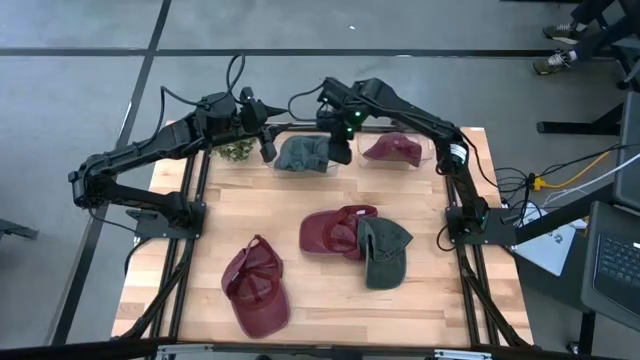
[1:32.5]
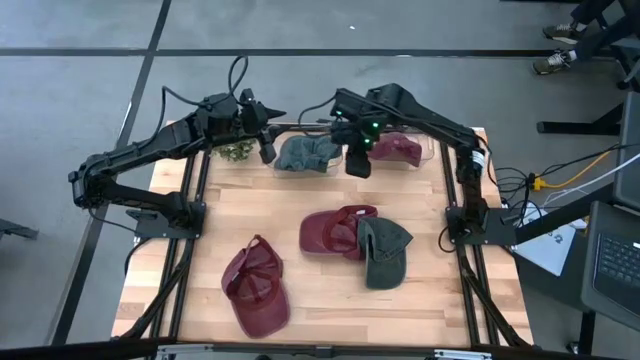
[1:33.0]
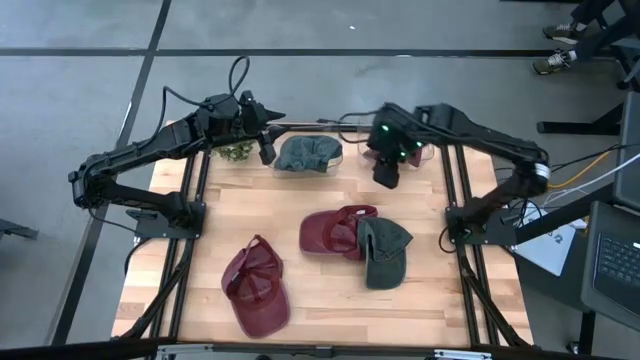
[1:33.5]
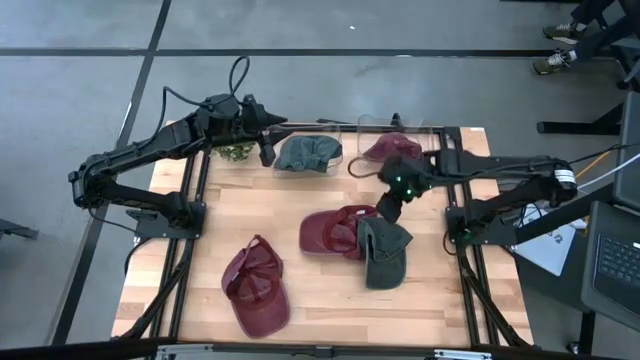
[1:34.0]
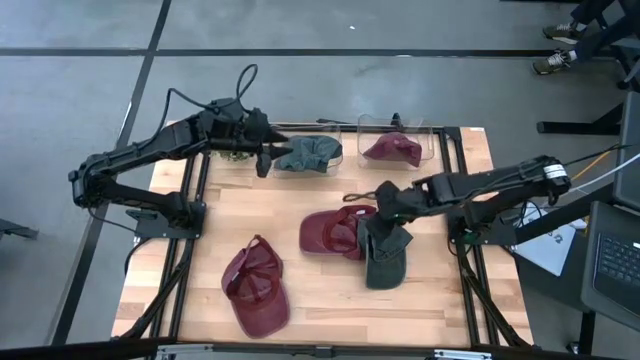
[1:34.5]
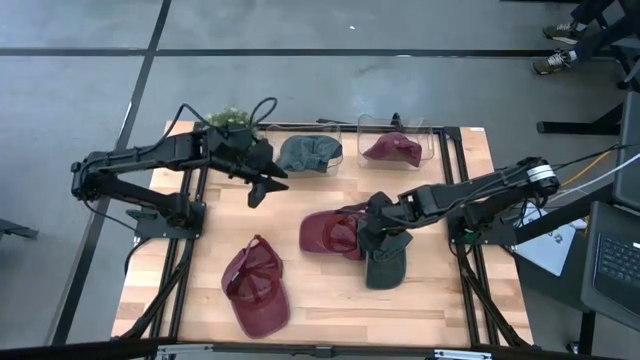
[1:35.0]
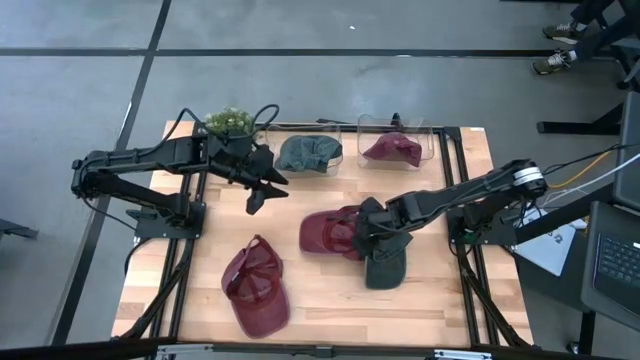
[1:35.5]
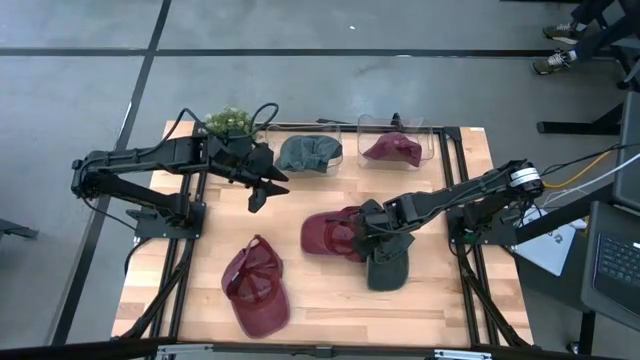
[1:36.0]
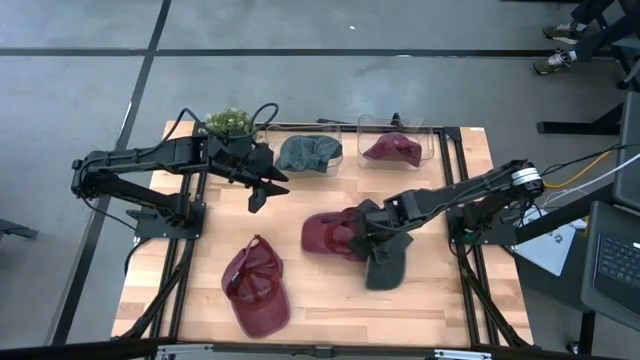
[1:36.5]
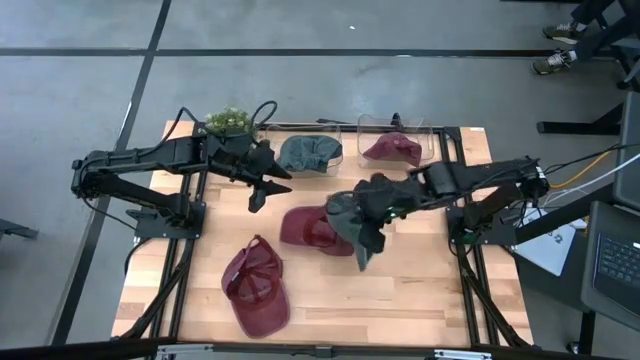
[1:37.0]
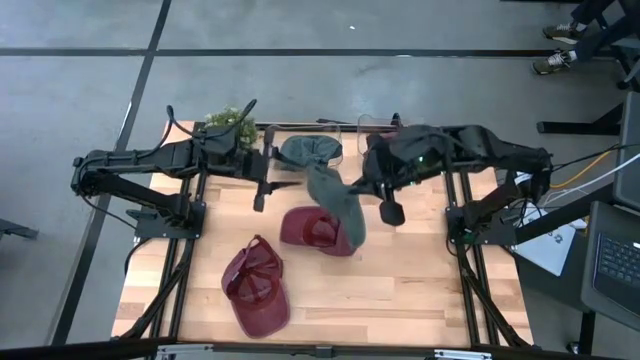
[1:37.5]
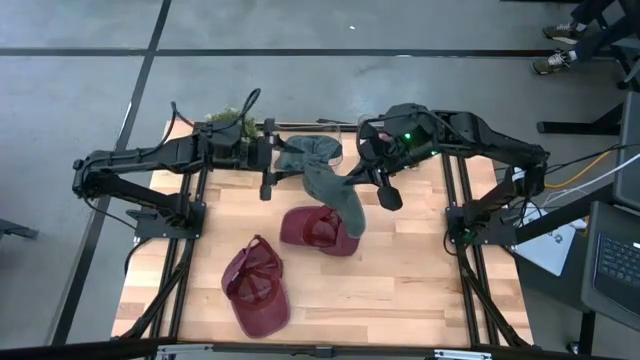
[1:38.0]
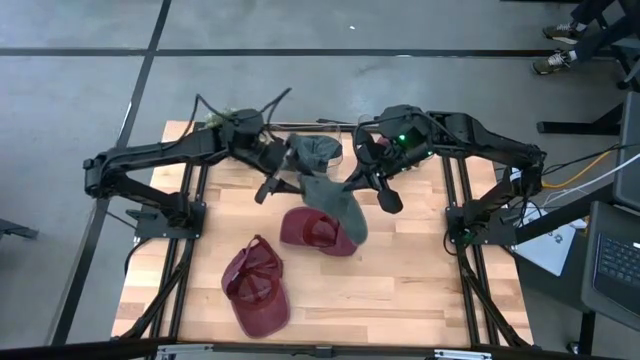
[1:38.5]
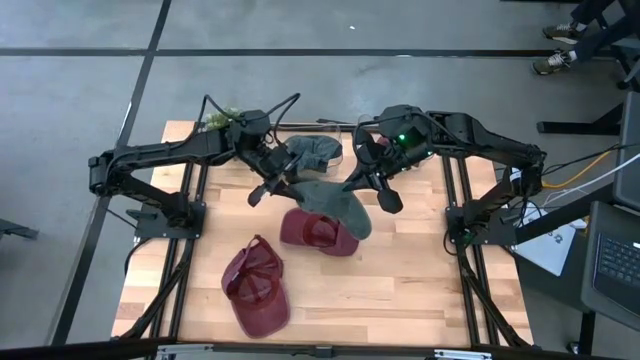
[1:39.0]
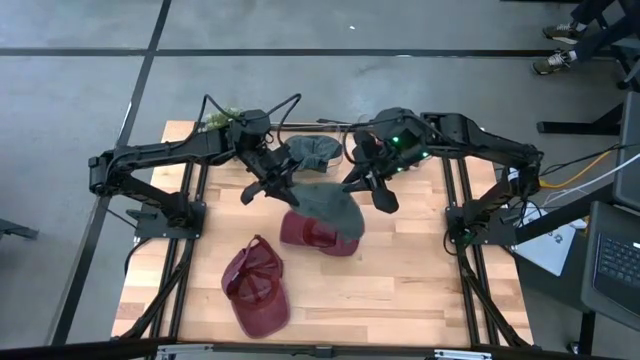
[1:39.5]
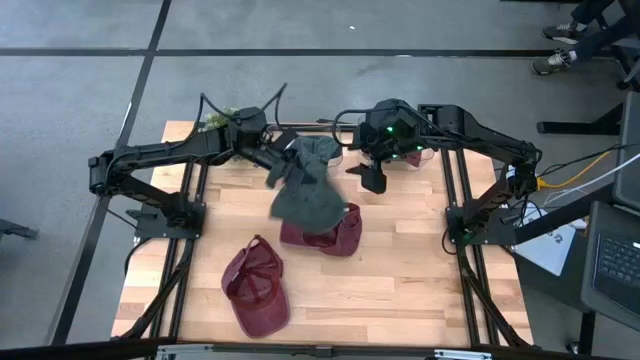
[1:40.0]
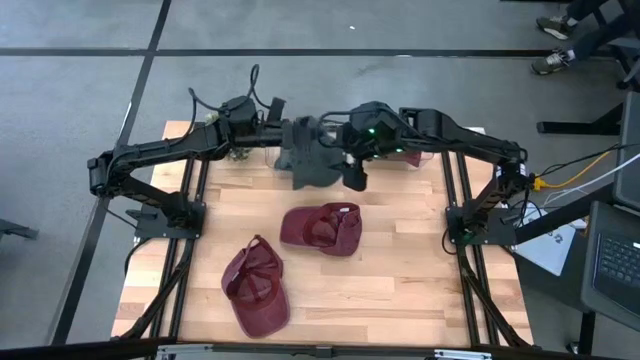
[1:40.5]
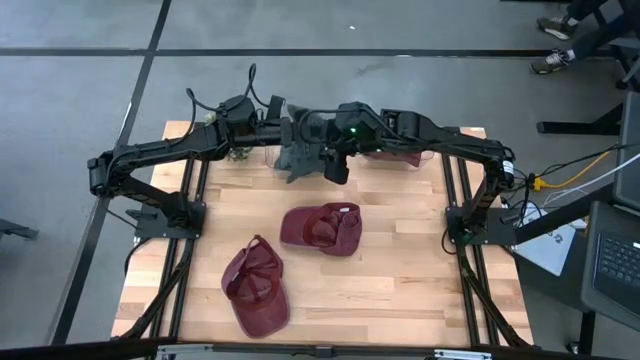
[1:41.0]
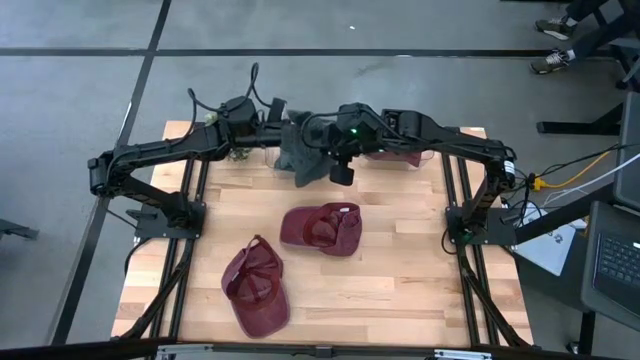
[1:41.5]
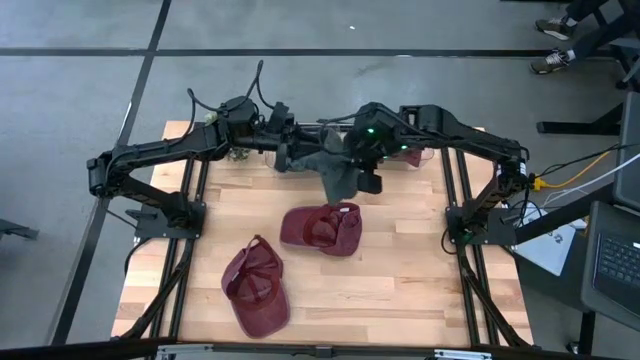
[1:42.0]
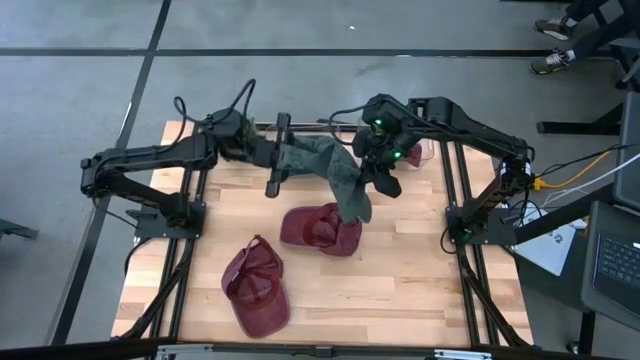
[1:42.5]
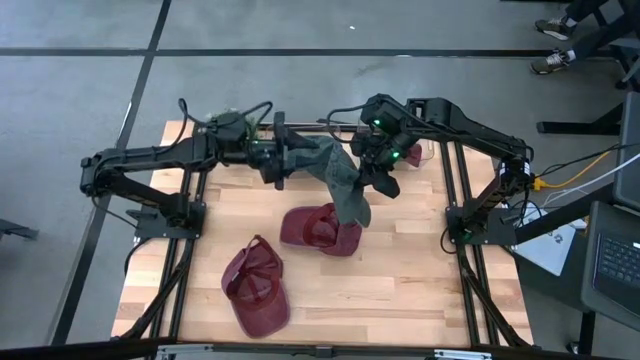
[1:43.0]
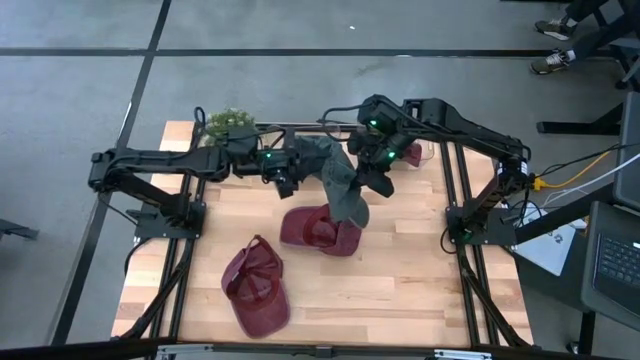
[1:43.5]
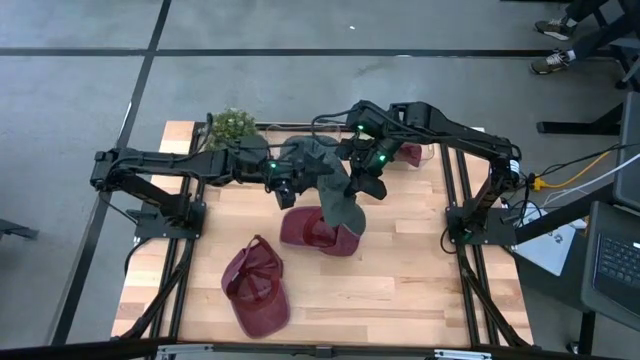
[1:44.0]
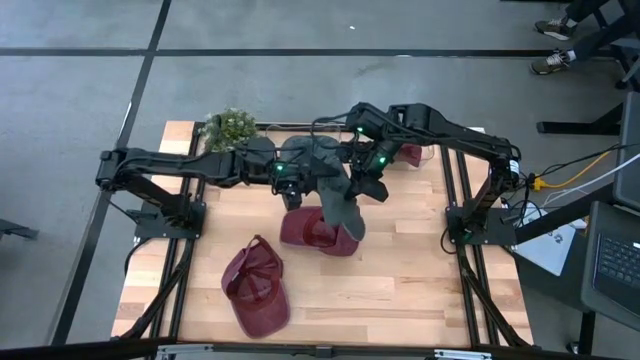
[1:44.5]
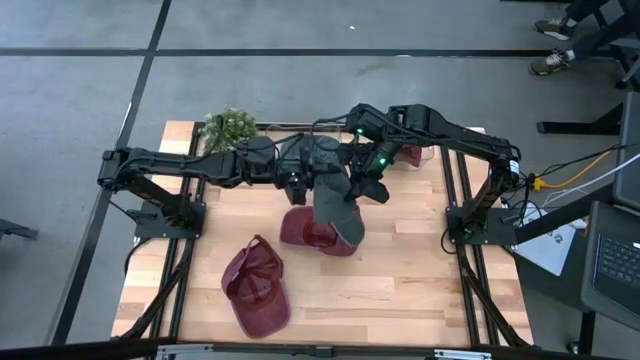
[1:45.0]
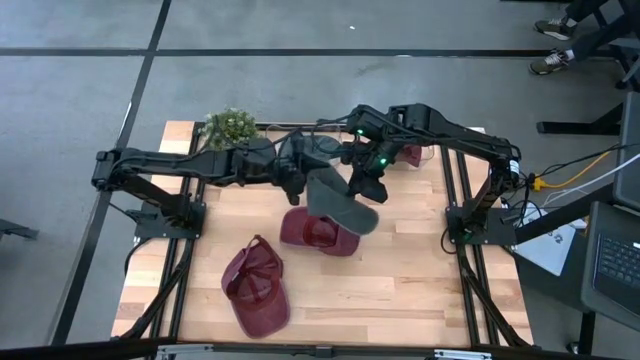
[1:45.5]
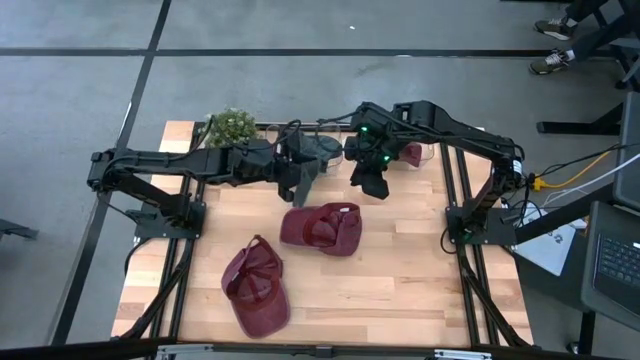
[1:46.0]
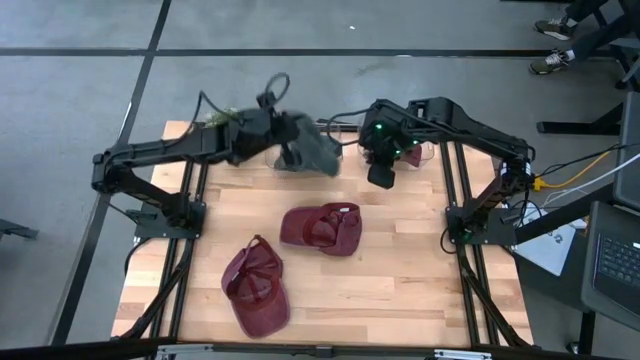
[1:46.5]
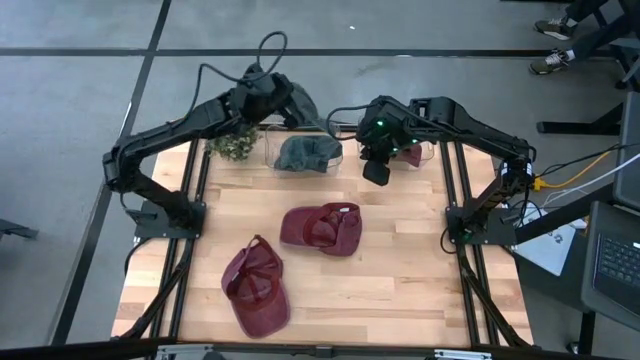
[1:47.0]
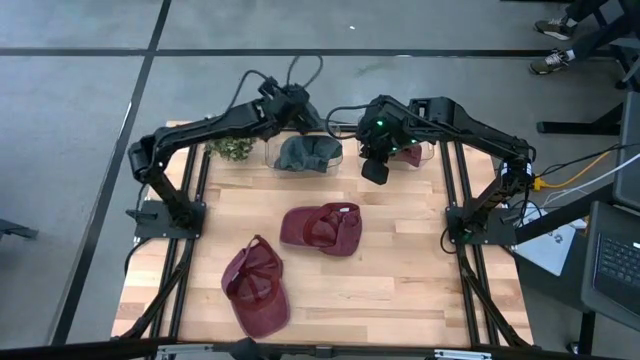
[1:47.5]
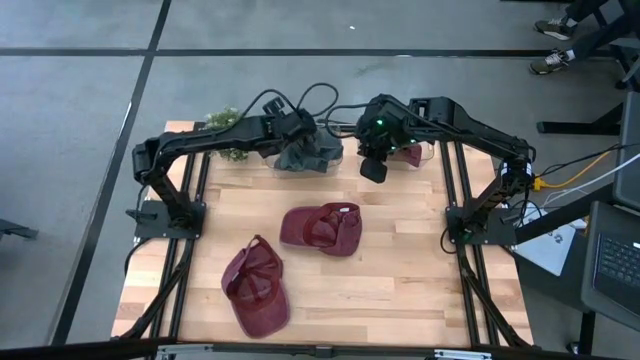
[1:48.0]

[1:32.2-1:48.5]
Task: Pick & Place hat
Put the gray cap on the gray cap in the left transparent bin

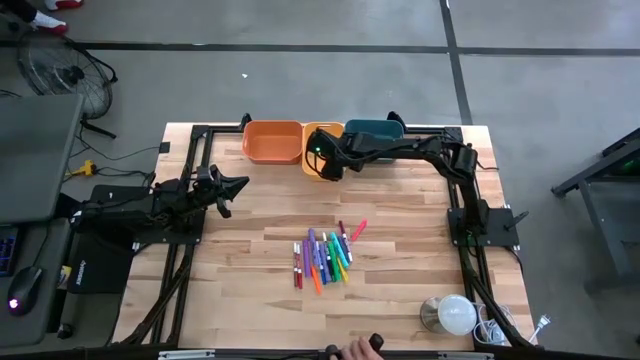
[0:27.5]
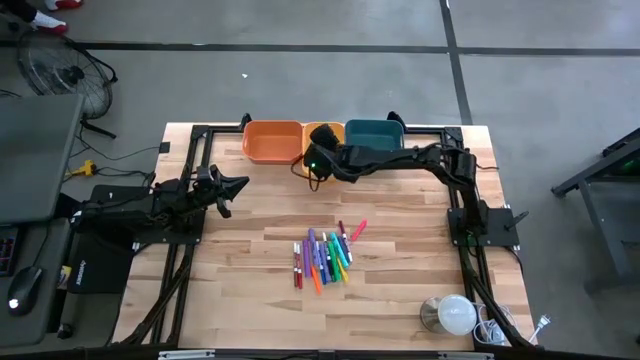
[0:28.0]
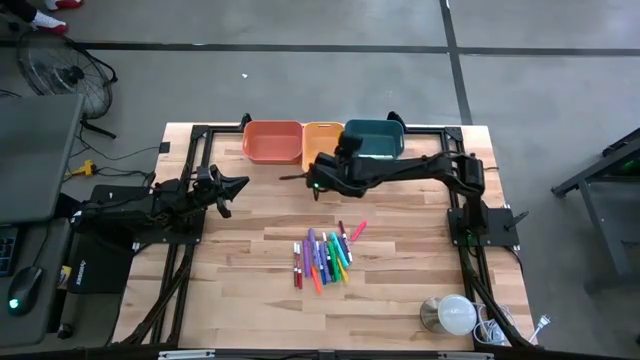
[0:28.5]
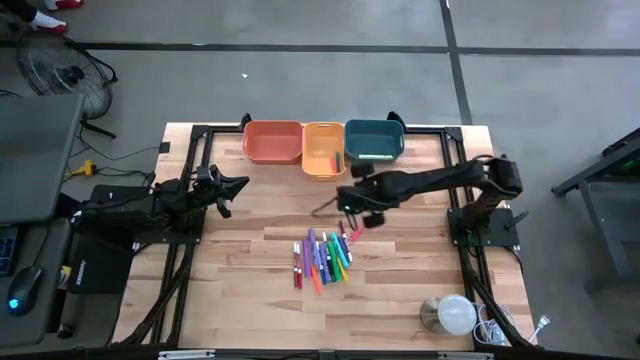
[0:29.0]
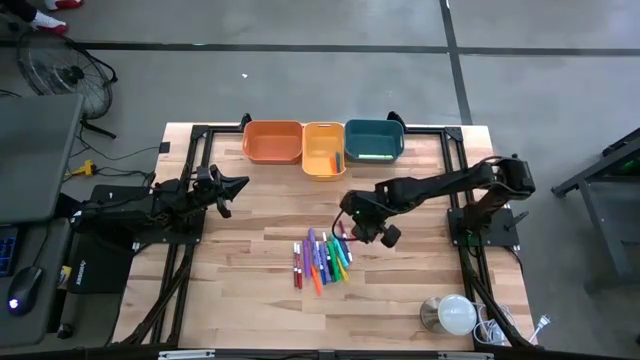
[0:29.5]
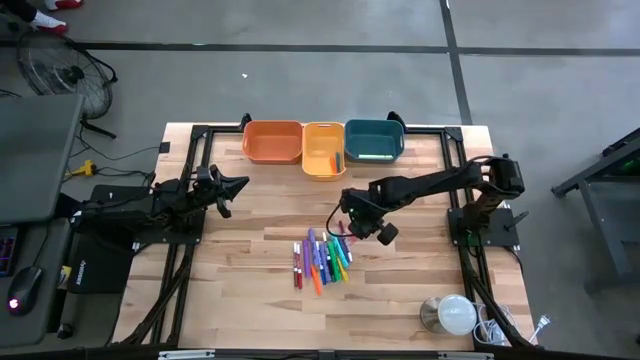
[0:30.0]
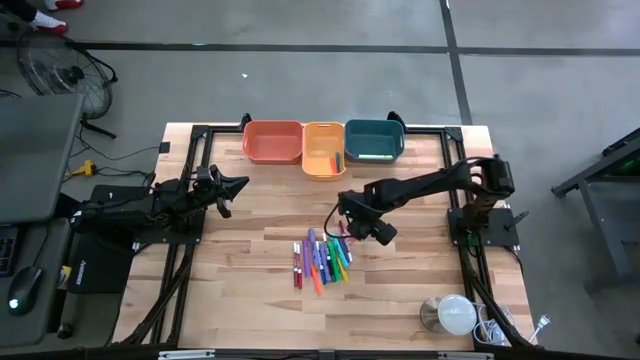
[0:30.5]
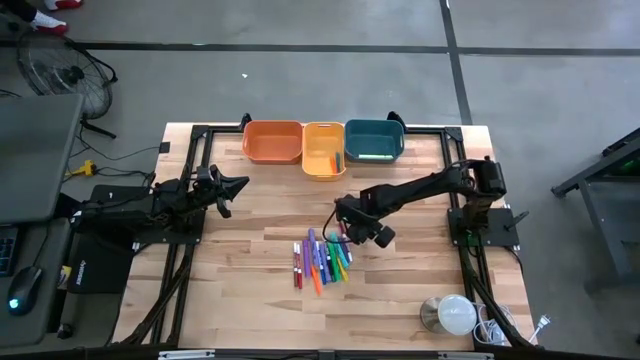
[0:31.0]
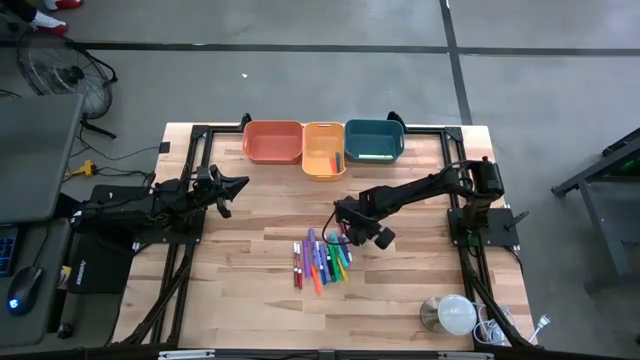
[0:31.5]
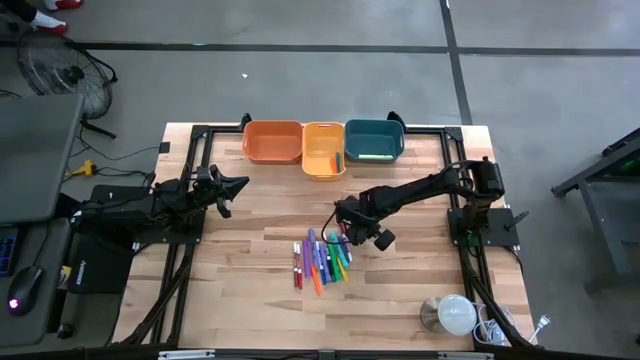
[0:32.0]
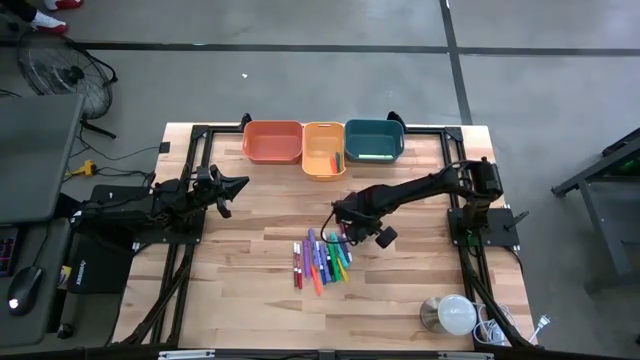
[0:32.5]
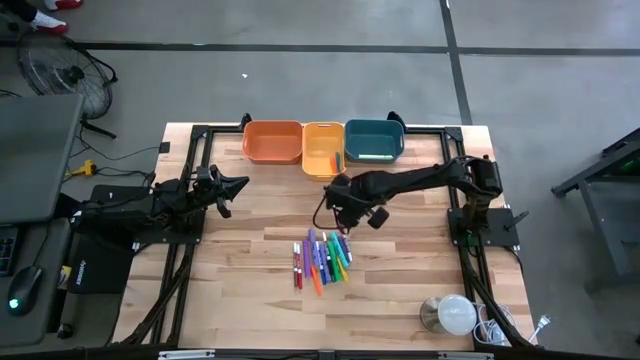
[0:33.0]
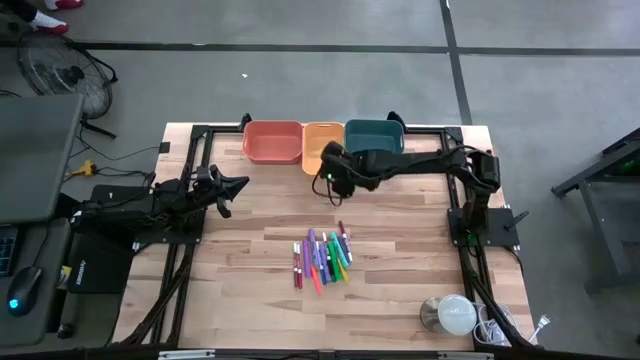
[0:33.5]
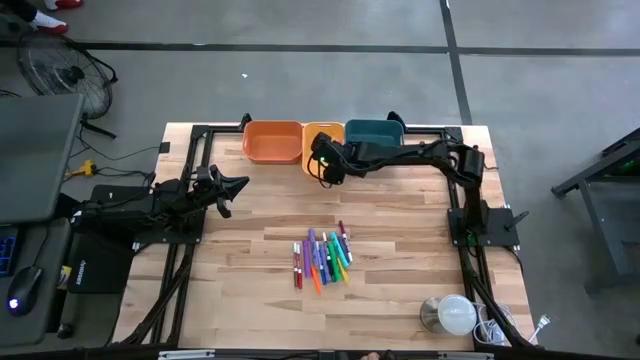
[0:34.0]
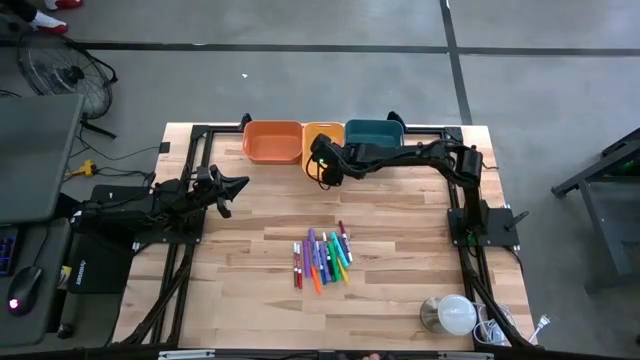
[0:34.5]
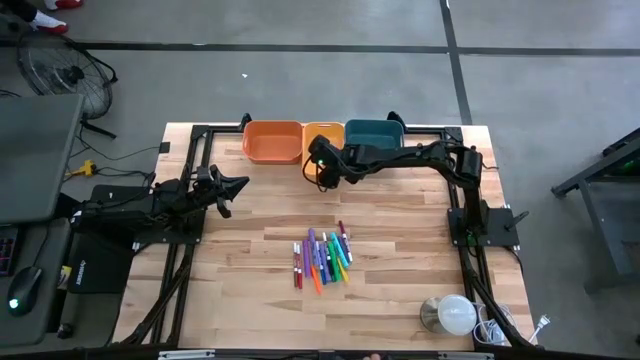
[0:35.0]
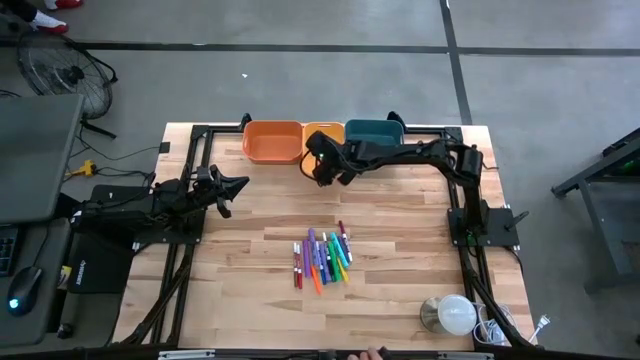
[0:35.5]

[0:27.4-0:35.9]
Task: Pick & Place Markers
Put the pink pen into the yellow bin
